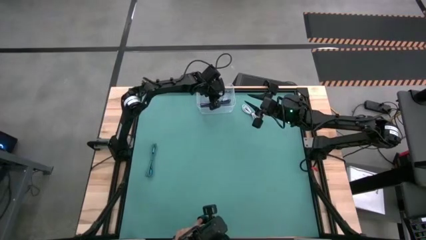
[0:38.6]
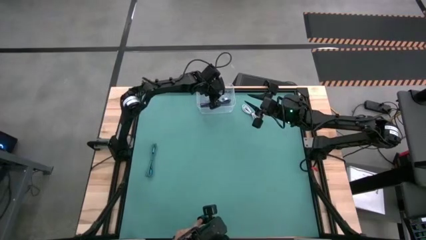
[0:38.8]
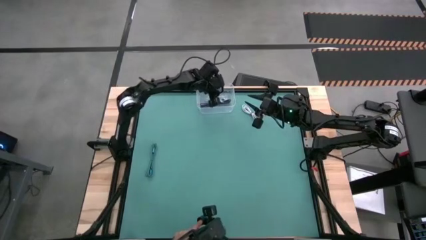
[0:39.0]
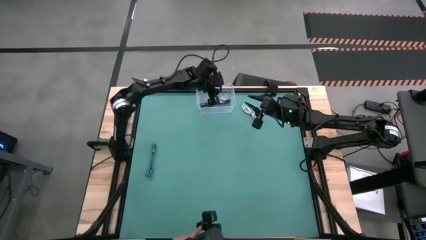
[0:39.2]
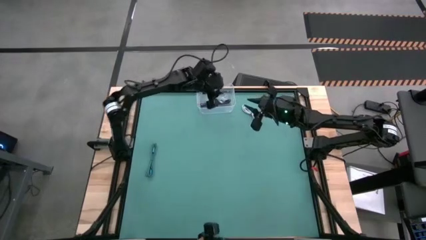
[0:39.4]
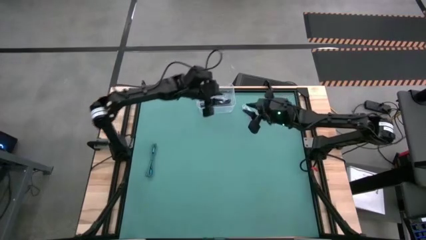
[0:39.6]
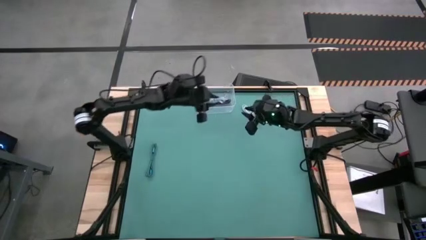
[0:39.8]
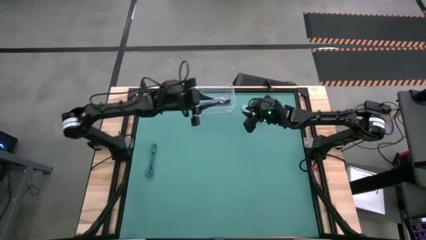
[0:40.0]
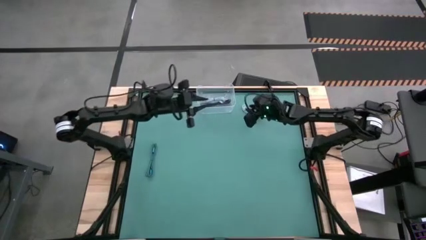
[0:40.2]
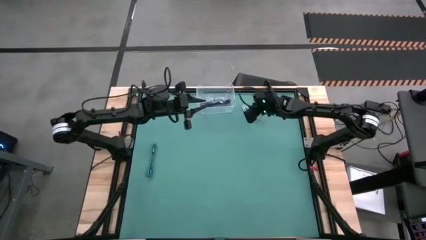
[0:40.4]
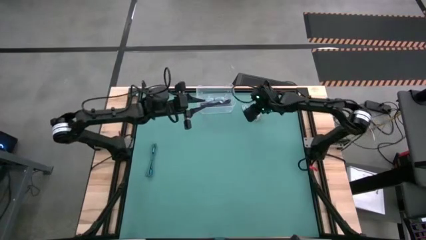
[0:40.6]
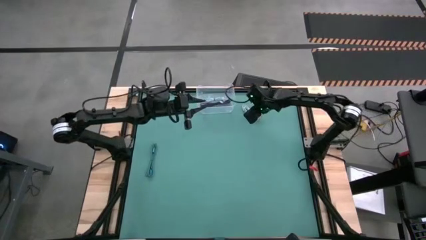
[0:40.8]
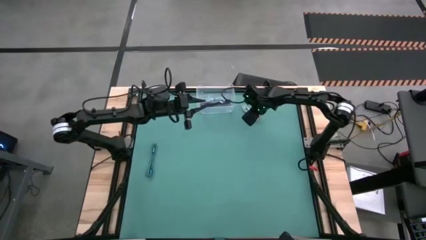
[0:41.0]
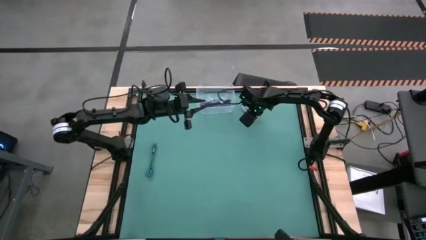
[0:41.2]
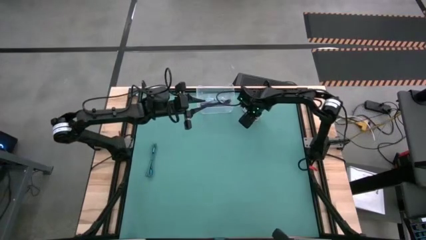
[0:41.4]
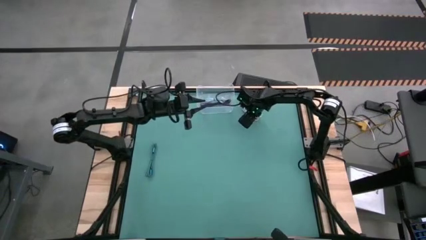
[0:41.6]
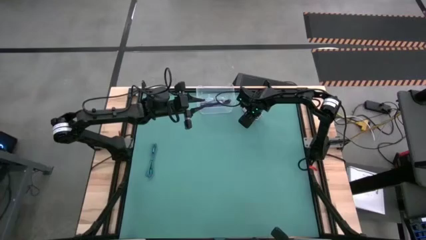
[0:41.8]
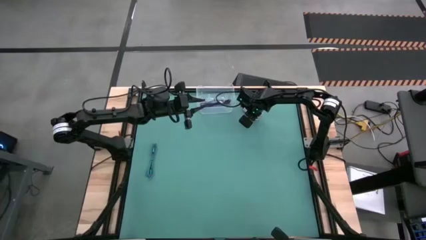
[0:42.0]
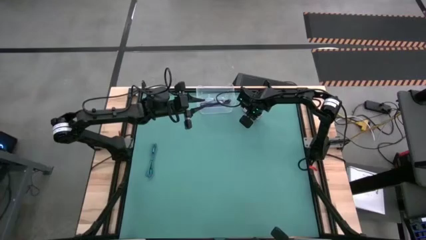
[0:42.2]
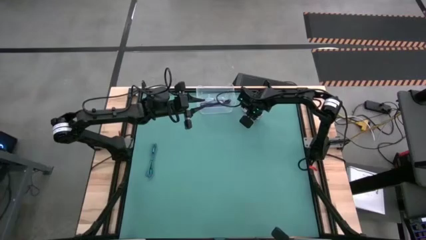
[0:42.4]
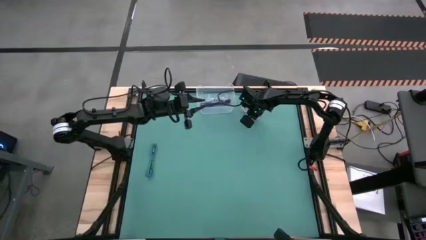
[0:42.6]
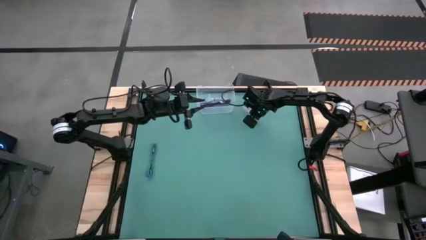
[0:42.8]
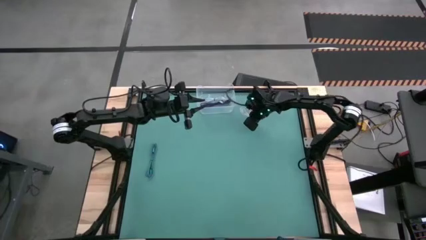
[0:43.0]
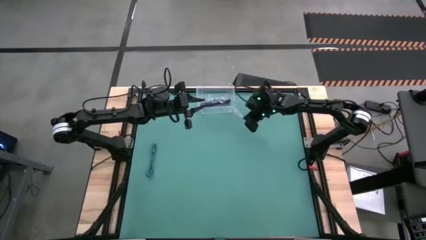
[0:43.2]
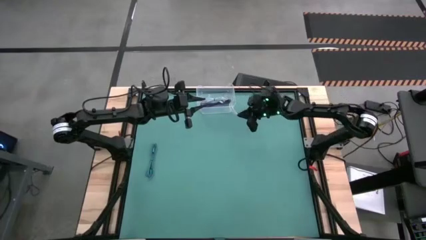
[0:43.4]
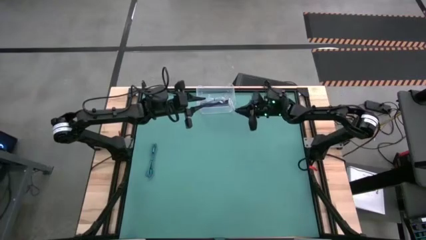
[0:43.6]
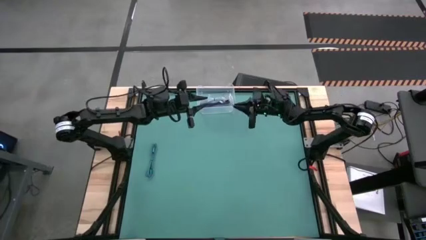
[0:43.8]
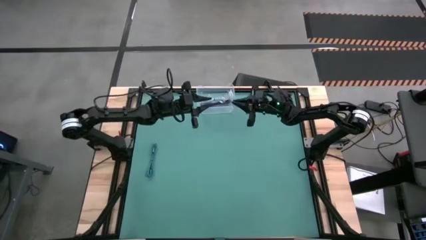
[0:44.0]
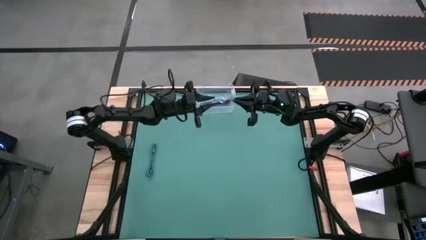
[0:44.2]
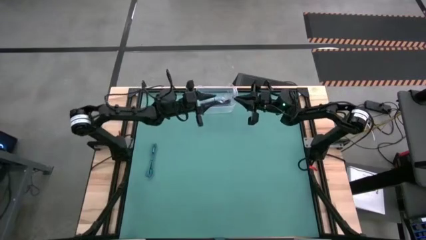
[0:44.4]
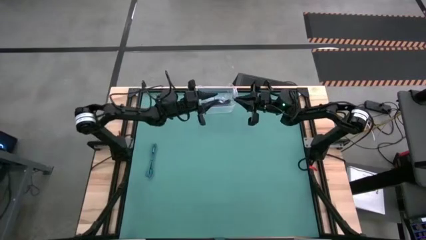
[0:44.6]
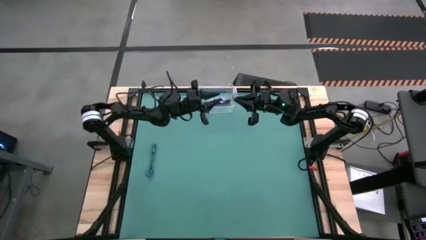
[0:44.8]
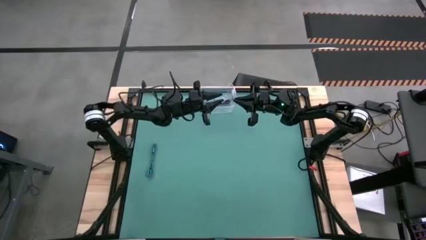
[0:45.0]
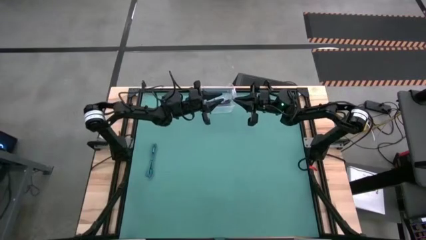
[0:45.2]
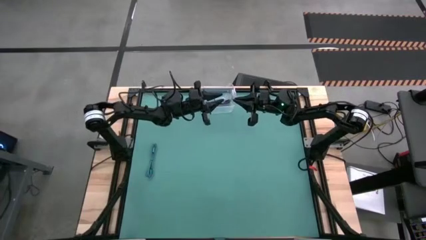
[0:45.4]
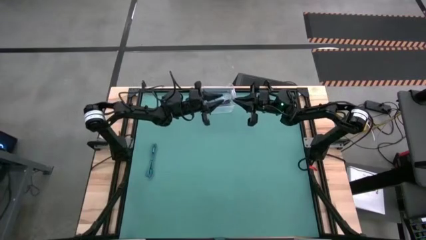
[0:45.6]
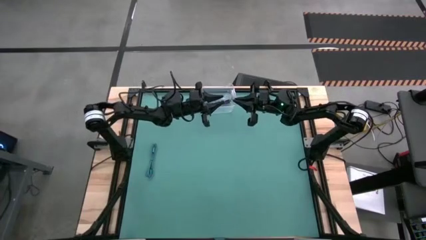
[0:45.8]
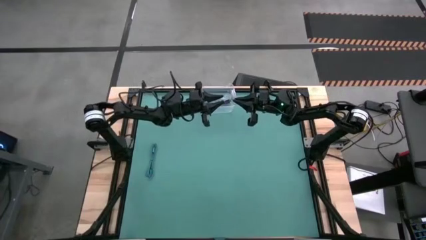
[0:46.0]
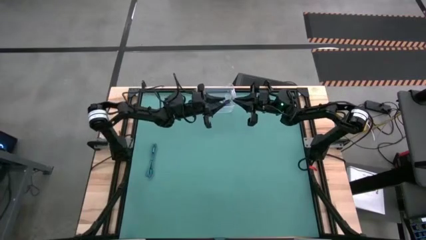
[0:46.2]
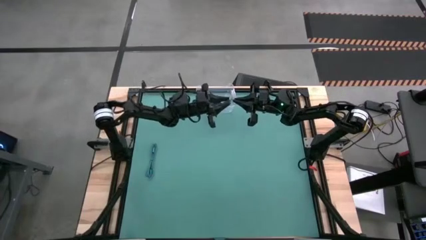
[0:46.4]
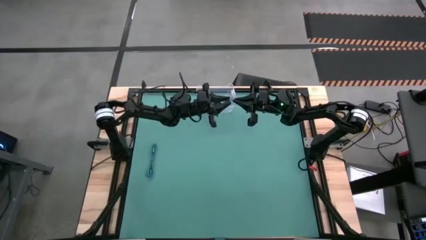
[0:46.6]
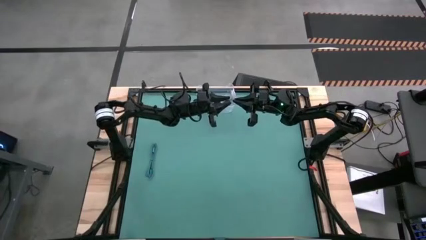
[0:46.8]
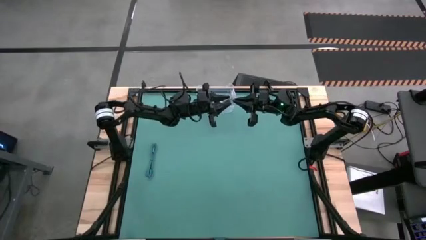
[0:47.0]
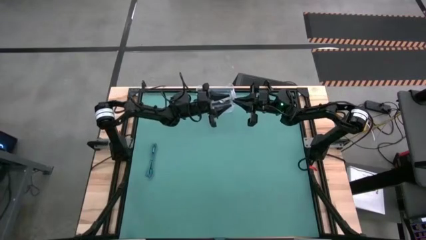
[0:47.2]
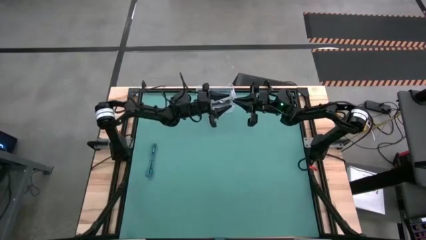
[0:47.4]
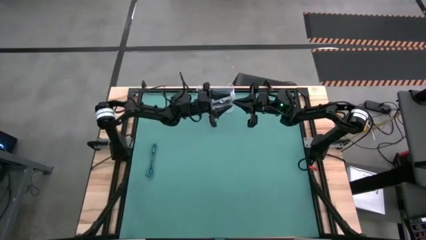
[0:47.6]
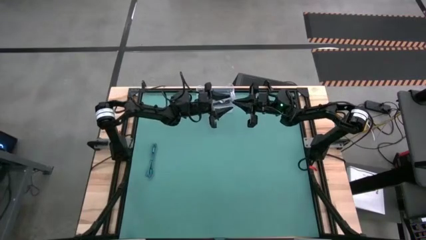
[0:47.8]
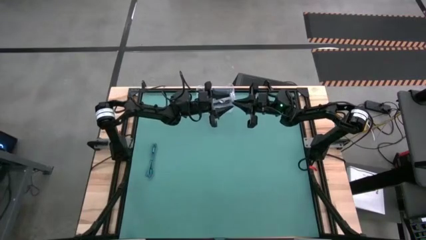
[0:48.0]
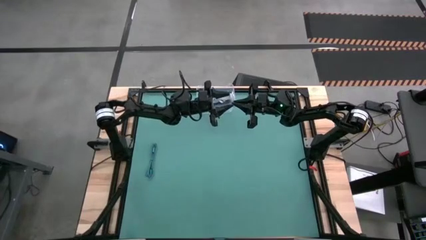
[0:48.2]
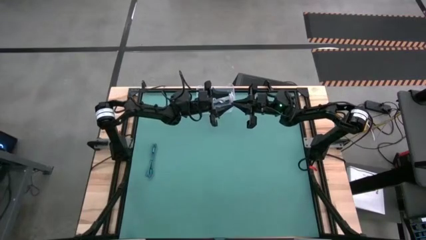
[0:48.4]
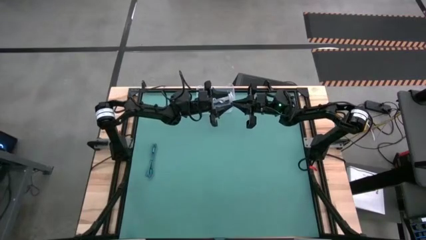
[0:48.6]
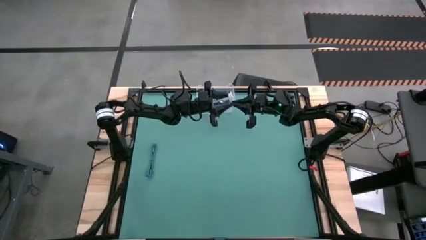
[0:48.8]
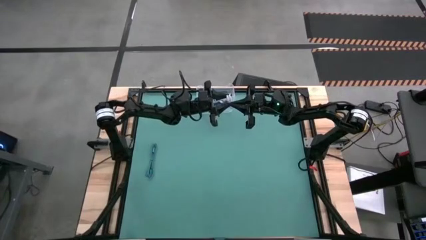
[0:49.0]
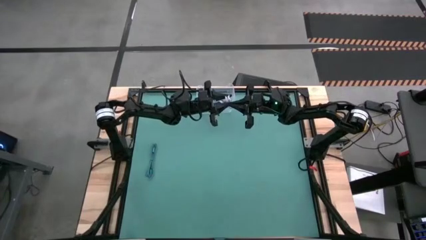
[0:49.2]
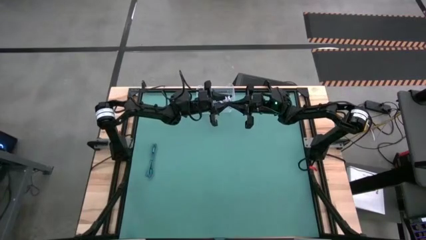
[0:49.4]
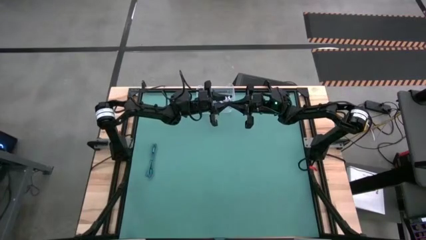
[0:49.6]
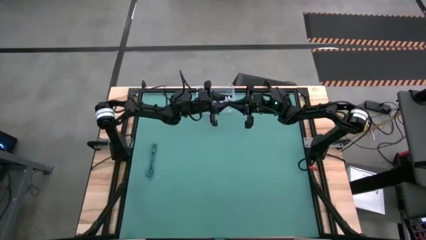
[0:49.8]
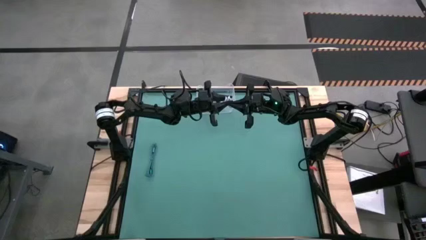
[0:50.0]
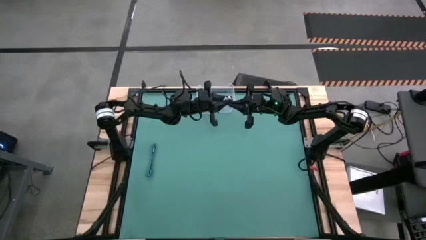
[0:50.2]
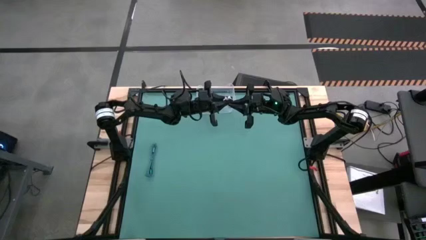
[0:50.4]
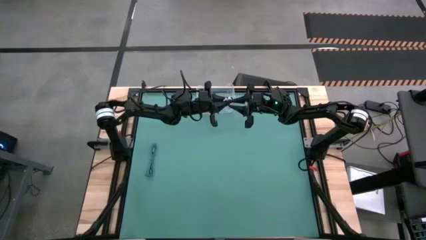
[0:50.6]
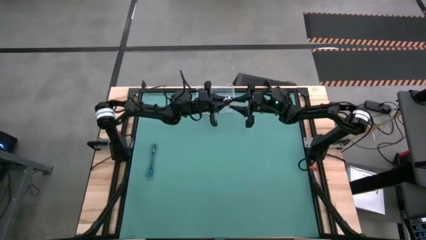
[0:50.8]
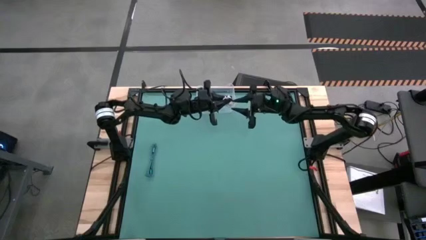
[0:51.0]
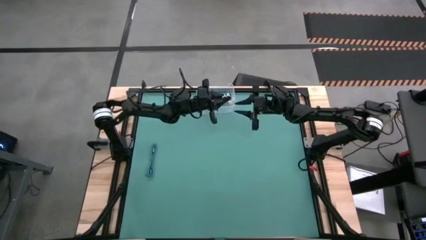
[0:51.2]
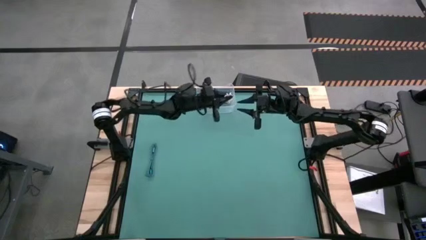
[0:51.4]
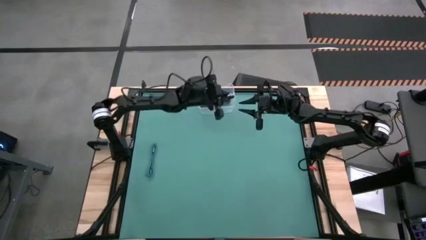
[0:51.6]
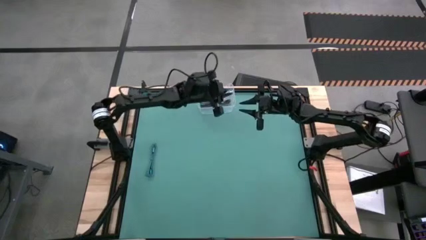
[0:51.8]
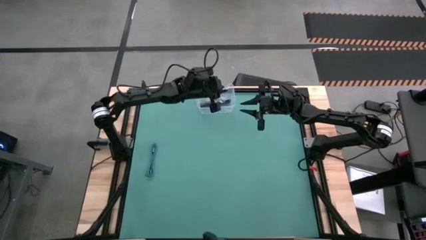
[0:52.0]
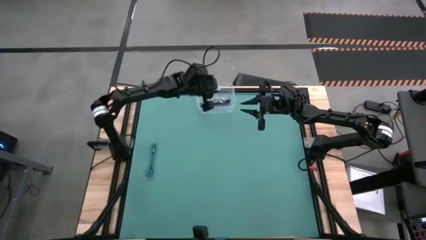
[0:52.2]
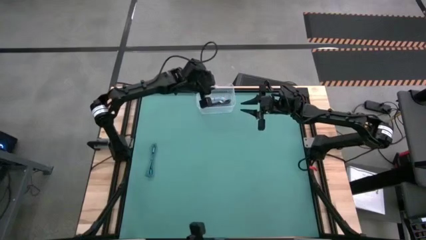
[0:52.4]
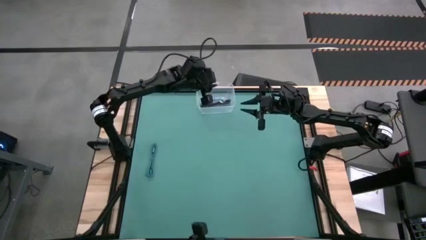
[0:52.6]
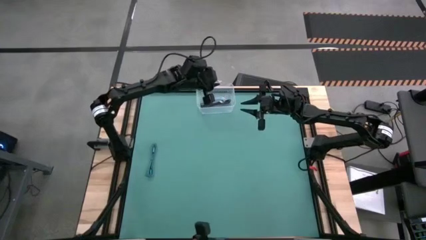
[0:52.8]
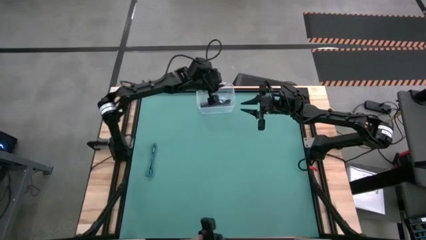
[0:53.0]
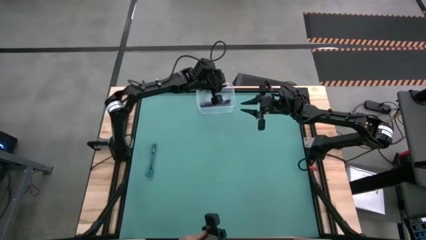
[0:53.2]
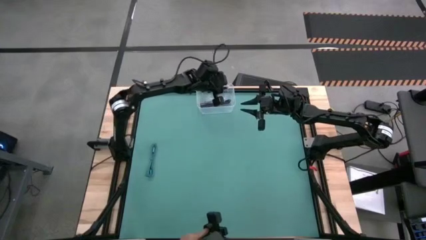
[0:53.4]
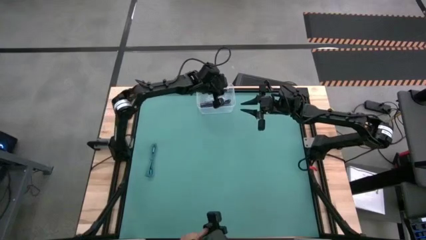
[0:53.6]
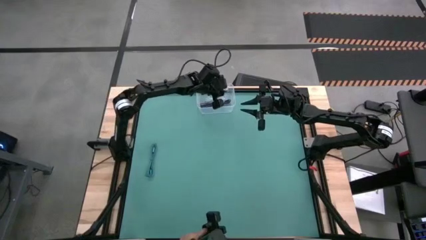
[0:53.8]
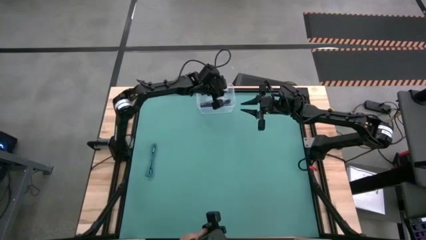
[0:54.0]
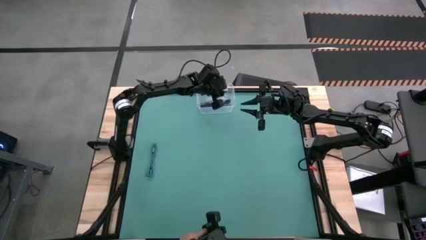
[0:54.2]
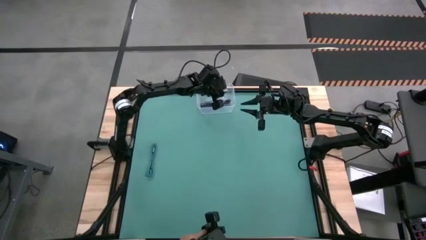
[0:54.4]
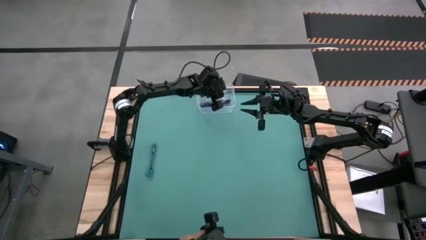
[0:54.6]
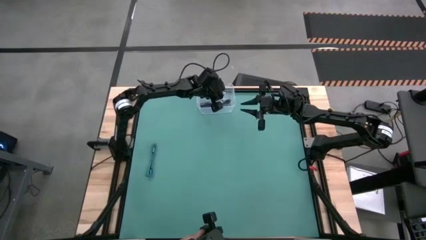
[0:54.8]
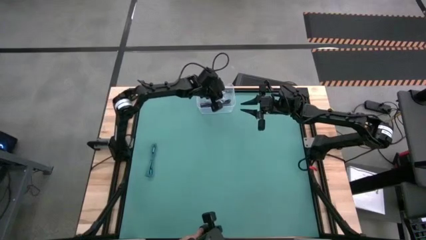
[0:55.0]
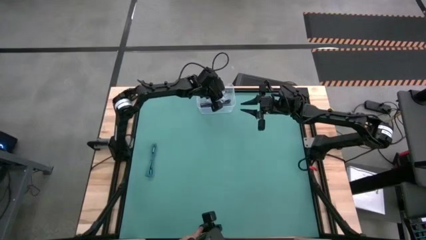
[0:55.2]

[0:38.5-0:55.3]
Task: Pick and place USB-C Cables
Put the white charger cable into the transparent bin
